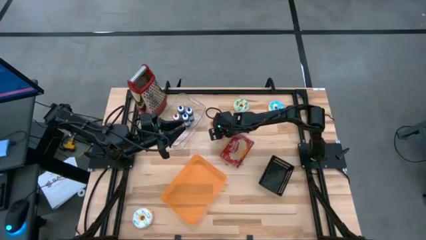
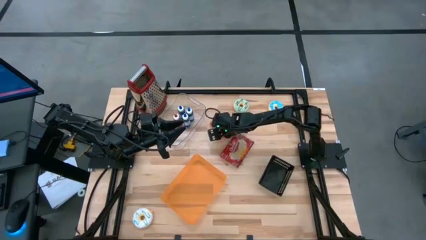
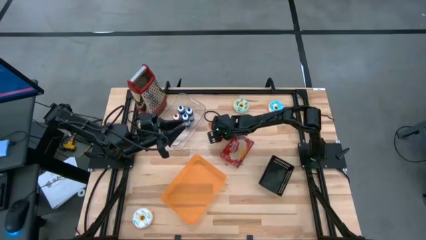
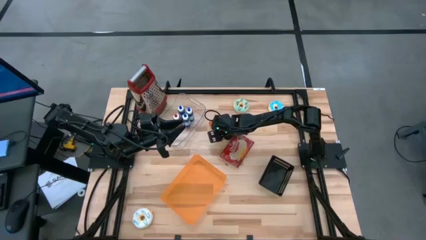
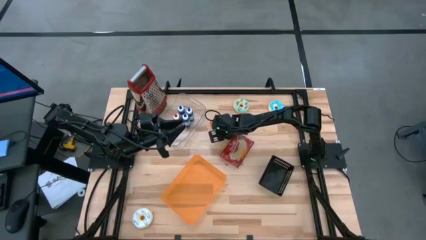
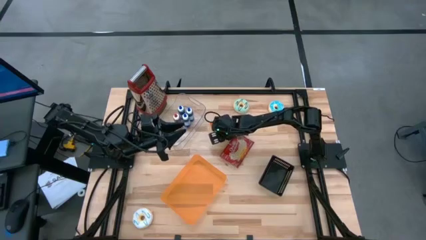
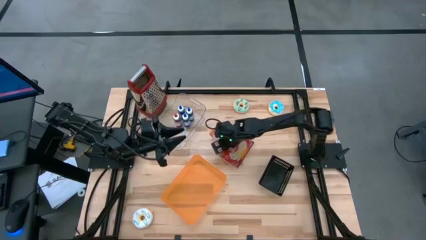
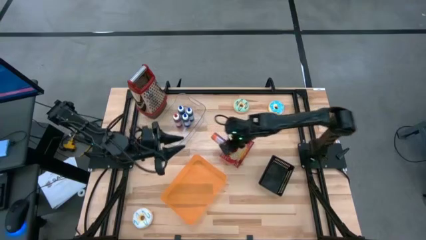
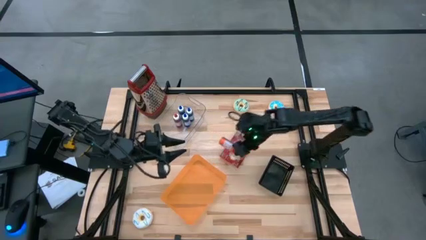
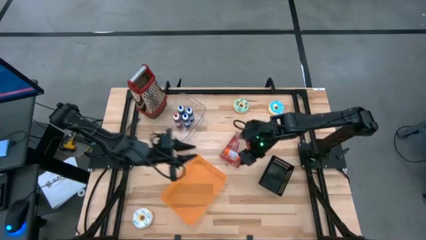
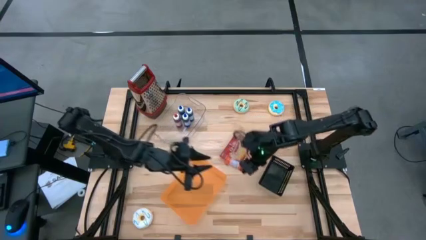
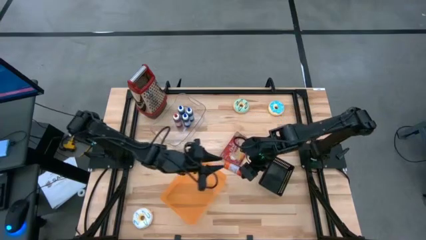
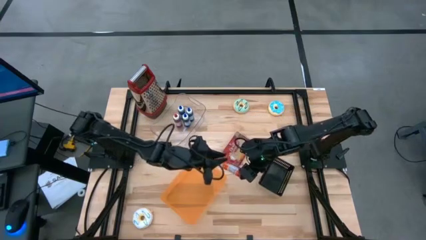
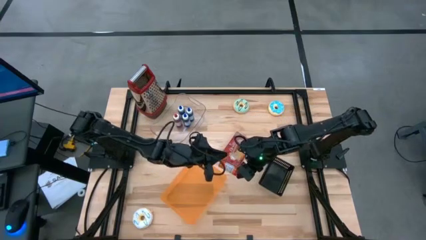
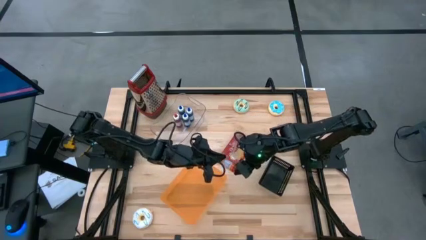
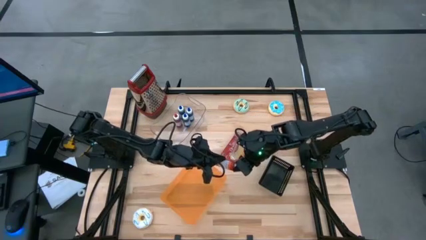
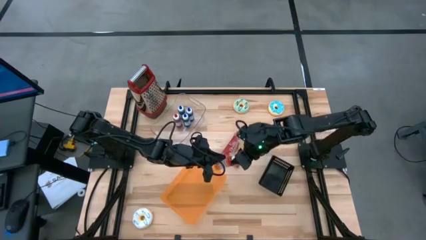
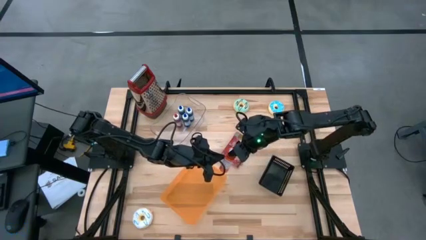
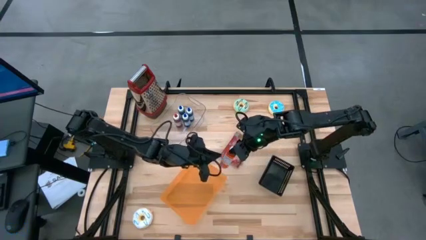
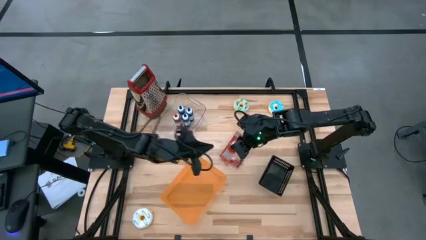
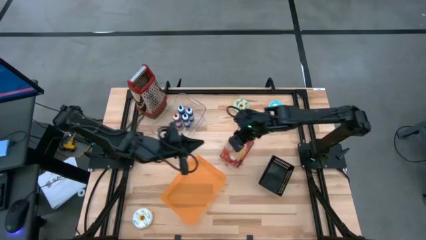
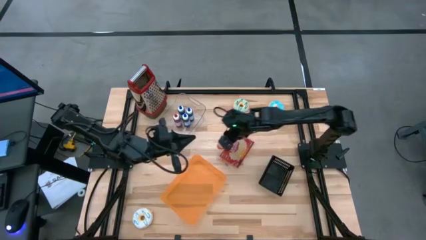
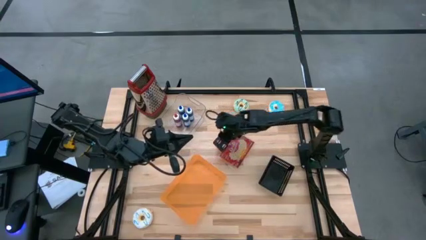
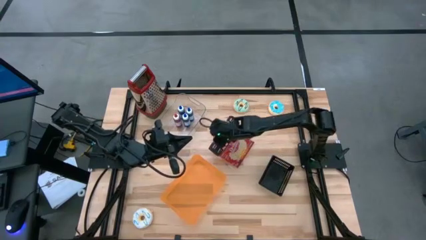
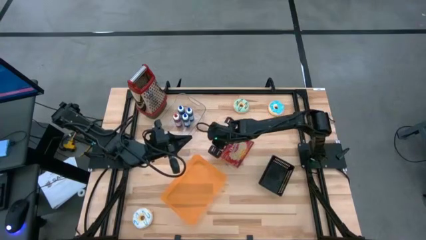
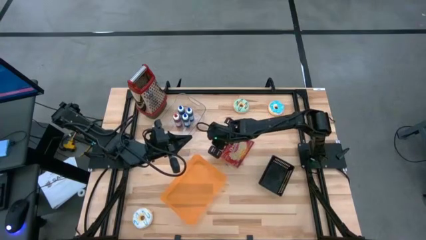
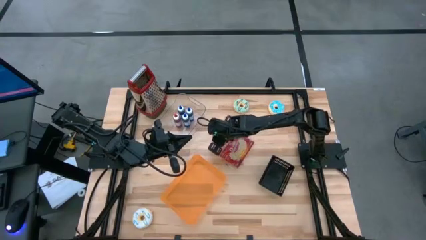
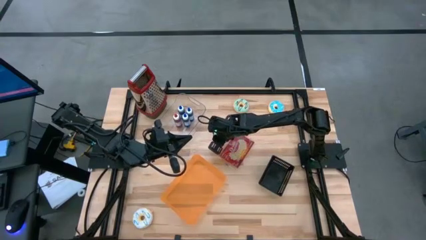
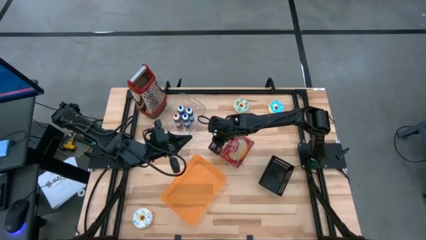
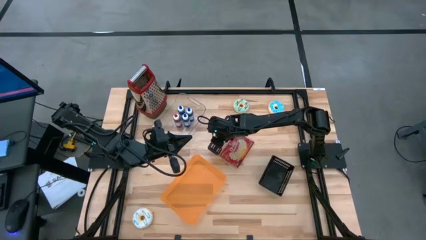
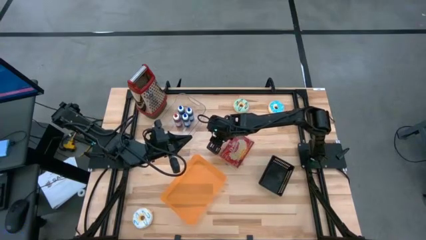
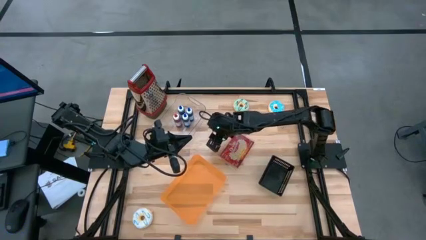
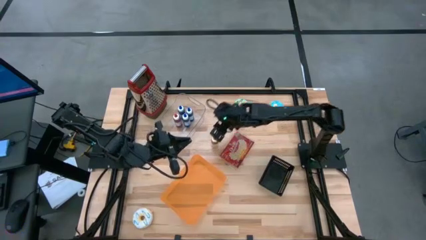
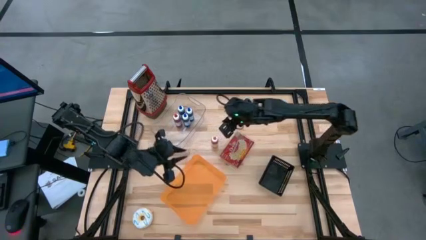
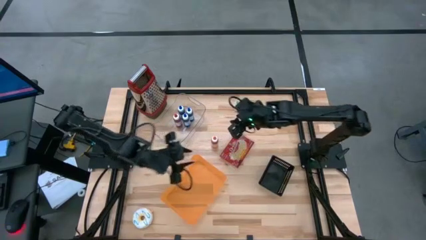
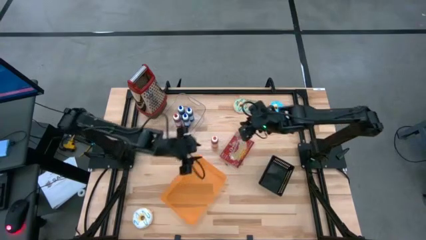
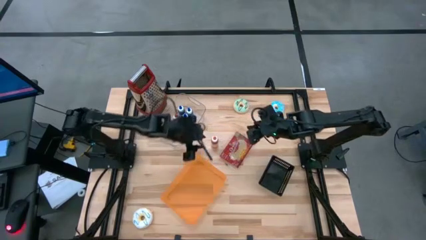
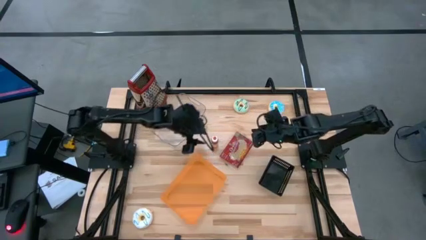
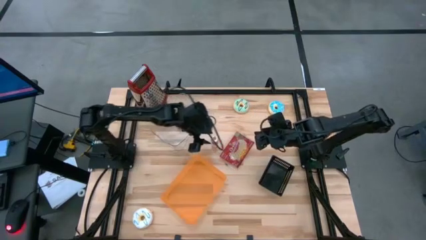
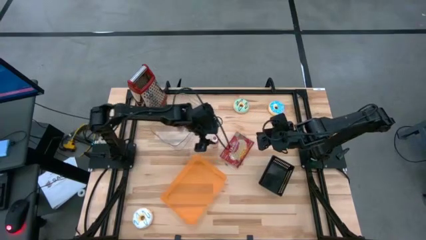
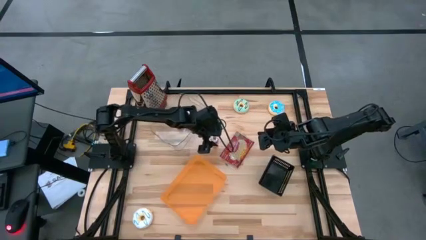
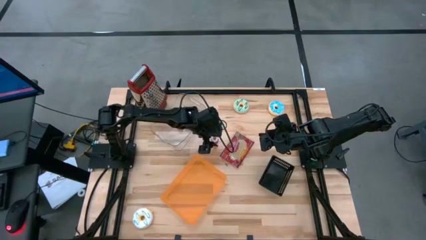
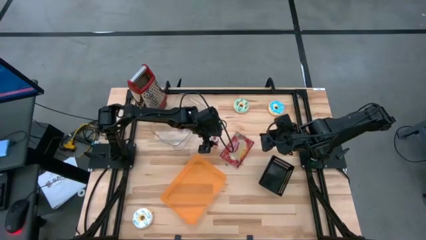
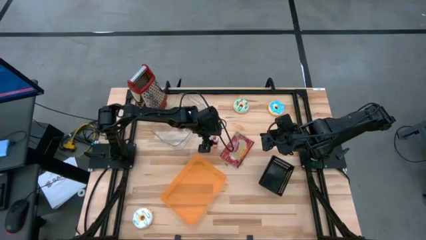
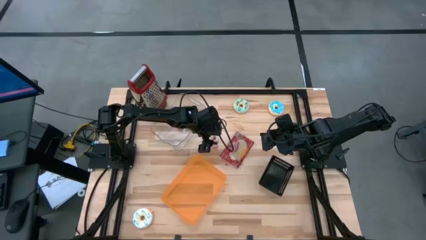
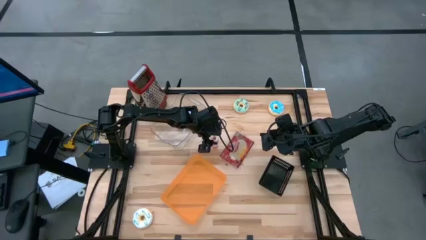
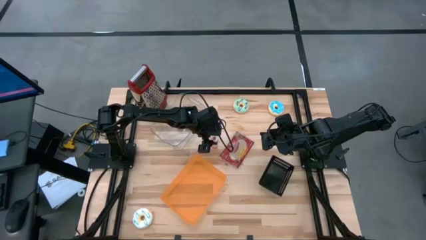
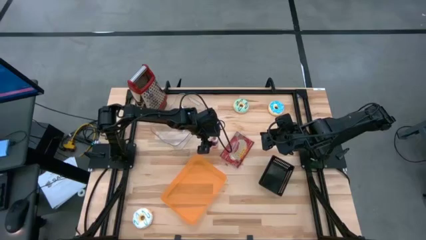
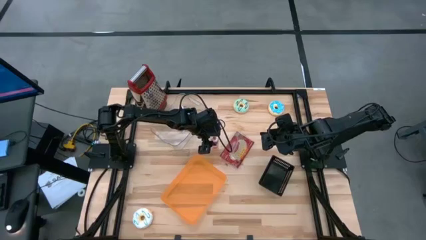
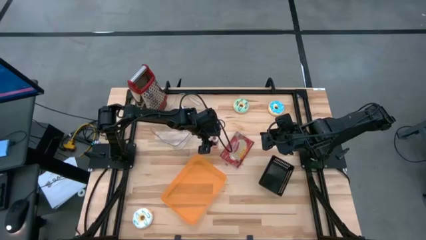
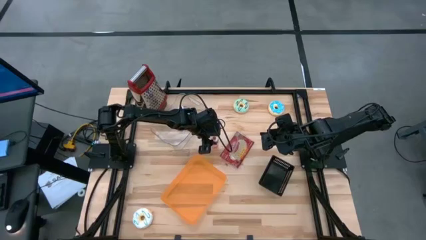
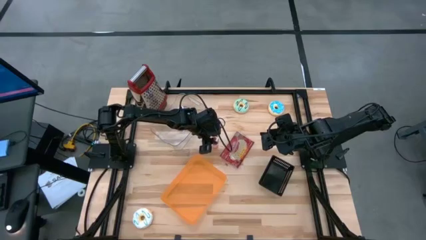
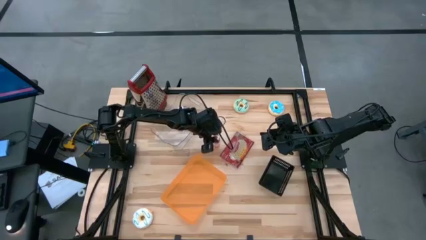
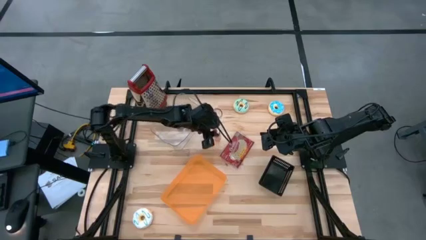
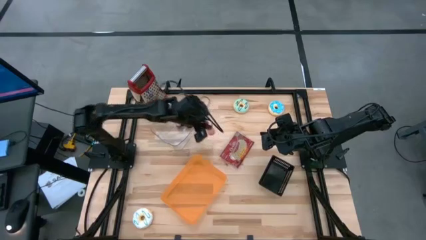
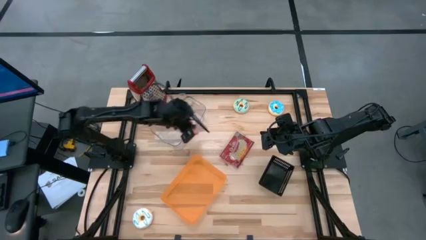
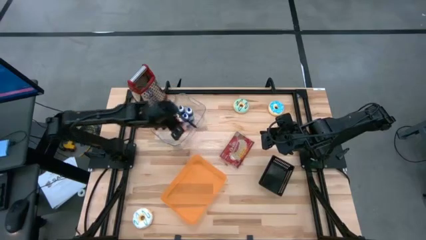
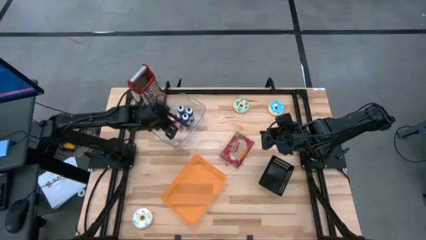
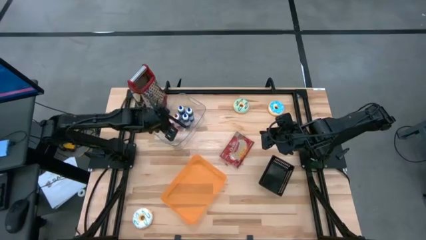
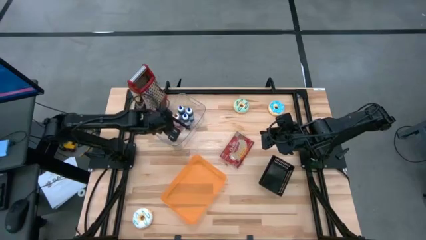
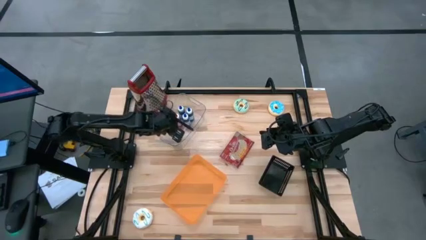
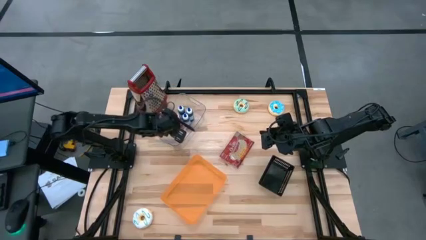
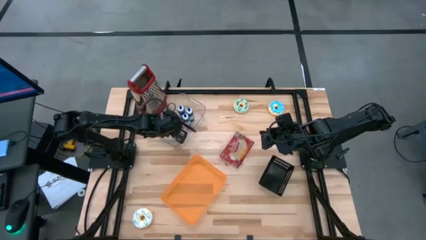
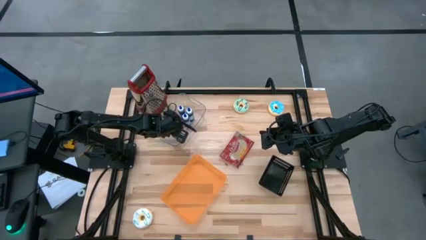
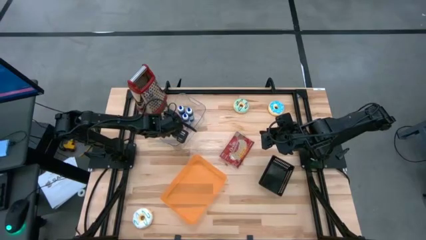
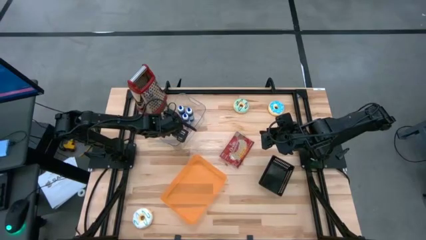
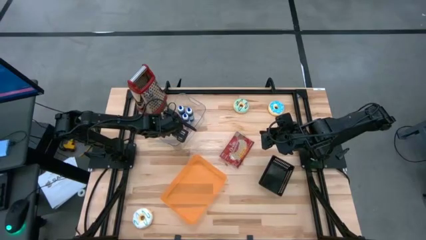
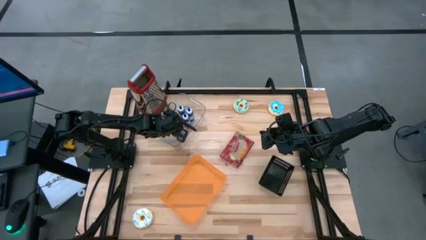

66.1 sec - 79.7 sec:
Put the orange food coloring bottle into the transparent bin
